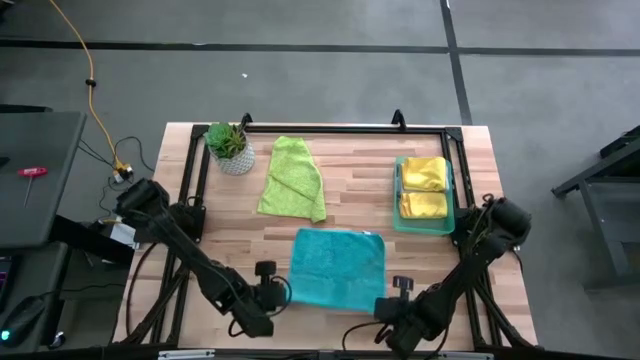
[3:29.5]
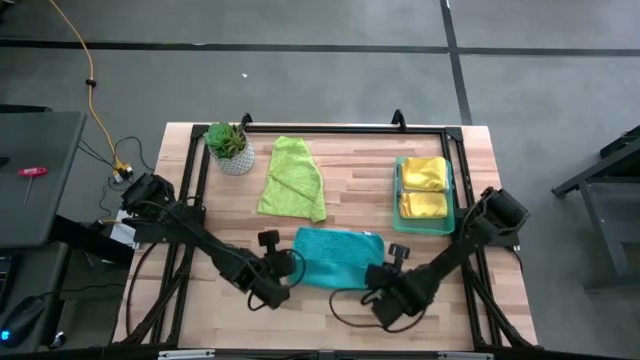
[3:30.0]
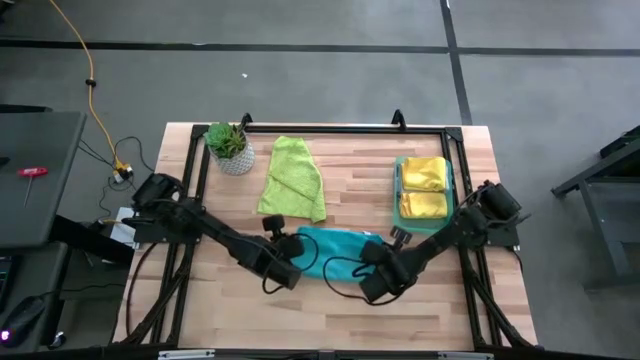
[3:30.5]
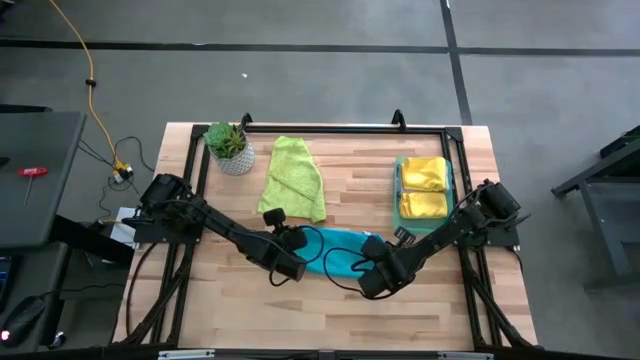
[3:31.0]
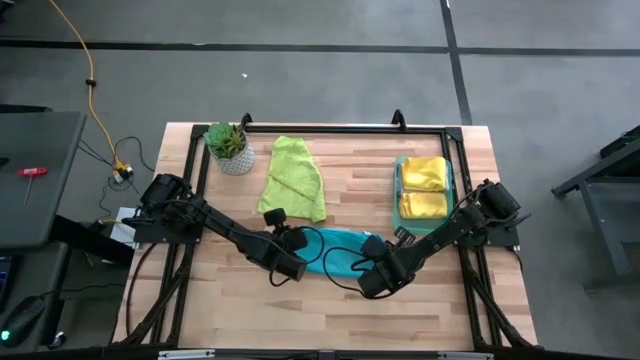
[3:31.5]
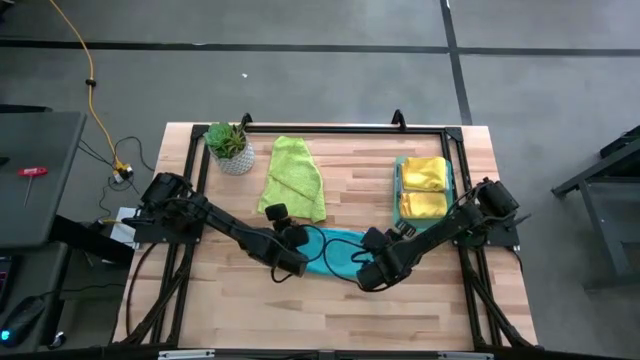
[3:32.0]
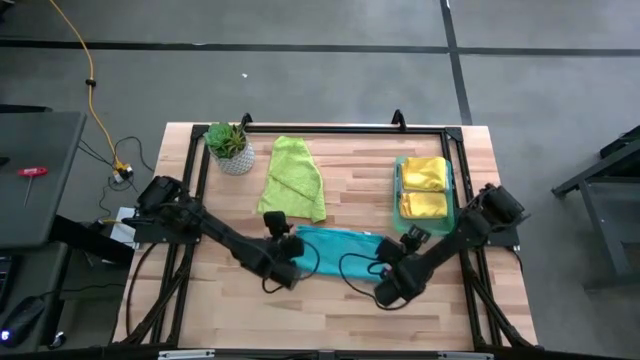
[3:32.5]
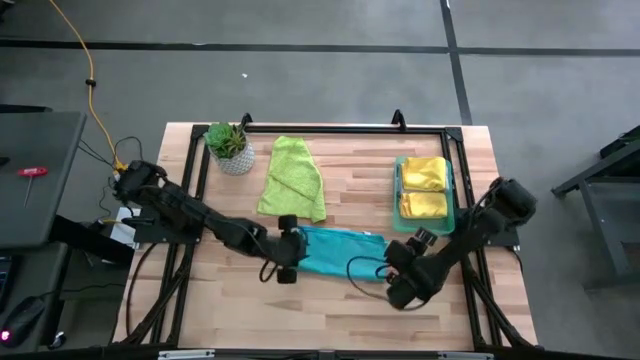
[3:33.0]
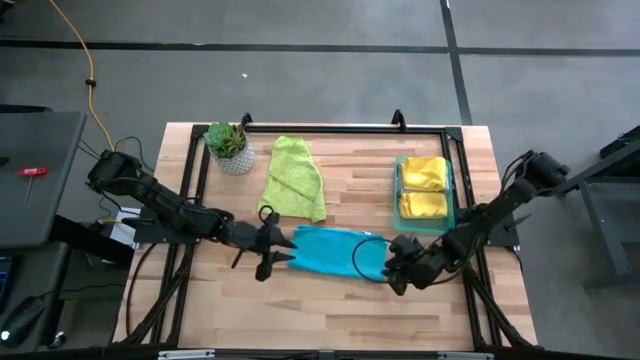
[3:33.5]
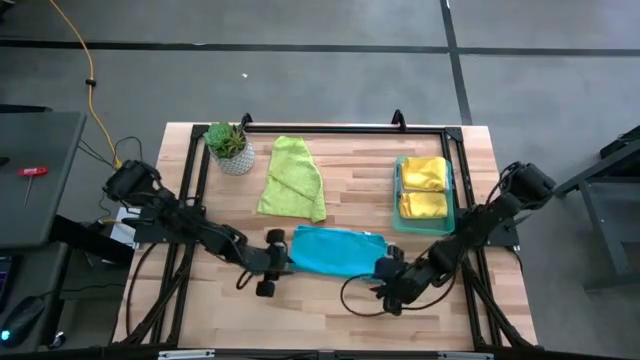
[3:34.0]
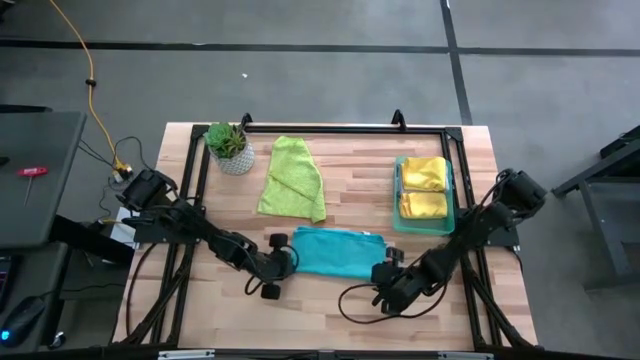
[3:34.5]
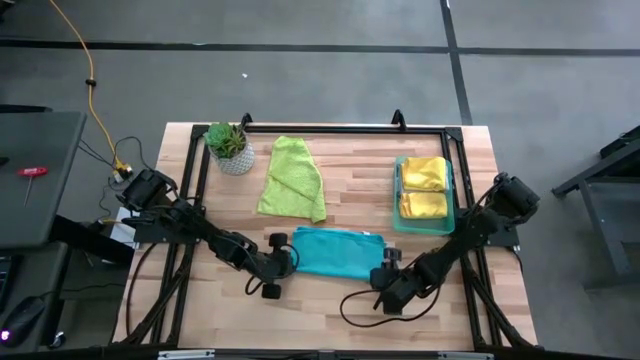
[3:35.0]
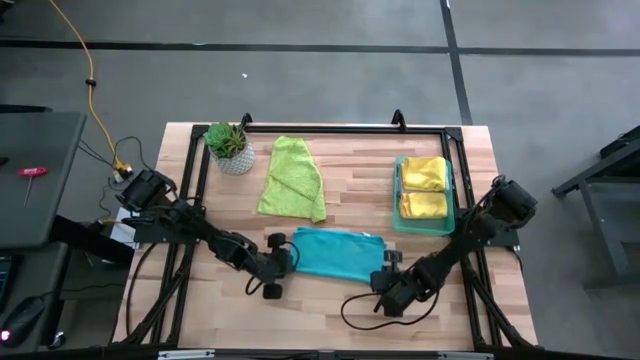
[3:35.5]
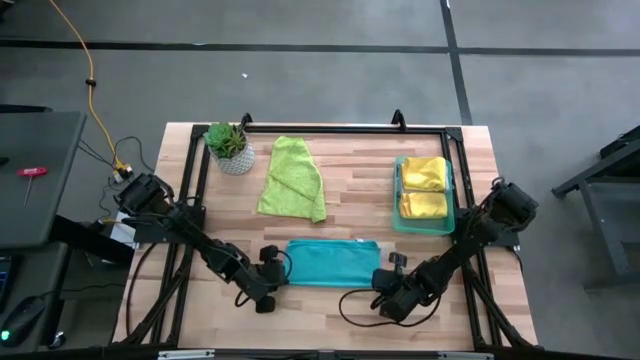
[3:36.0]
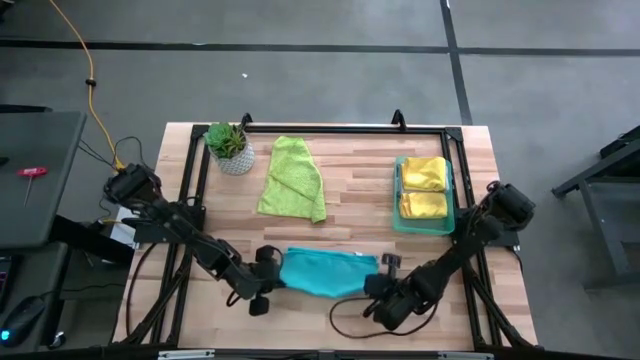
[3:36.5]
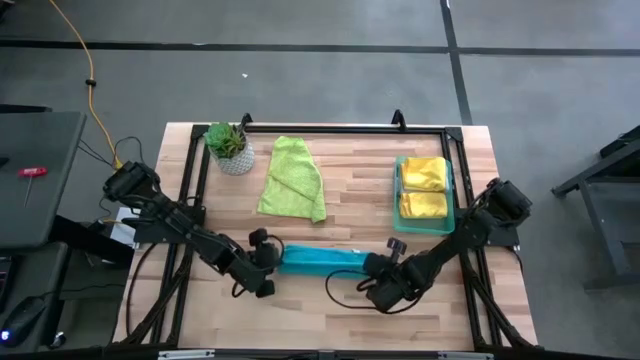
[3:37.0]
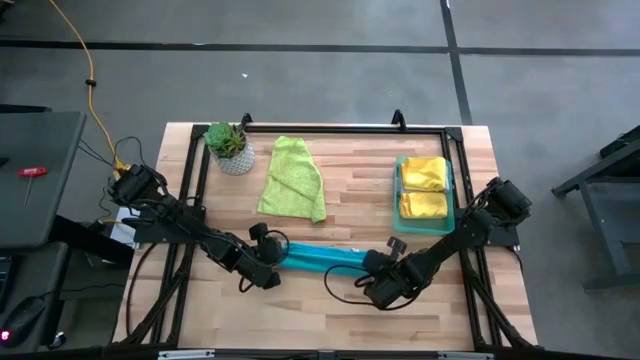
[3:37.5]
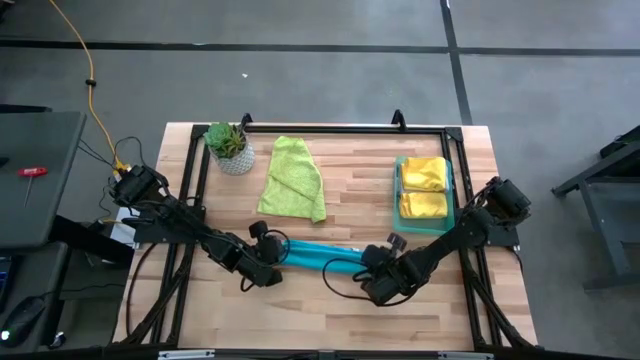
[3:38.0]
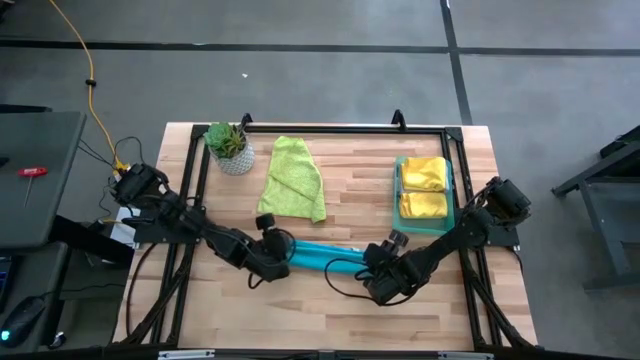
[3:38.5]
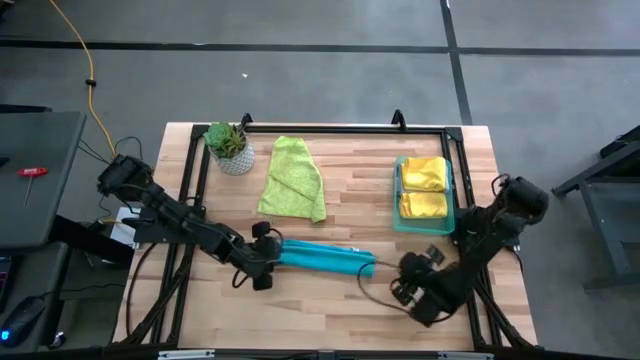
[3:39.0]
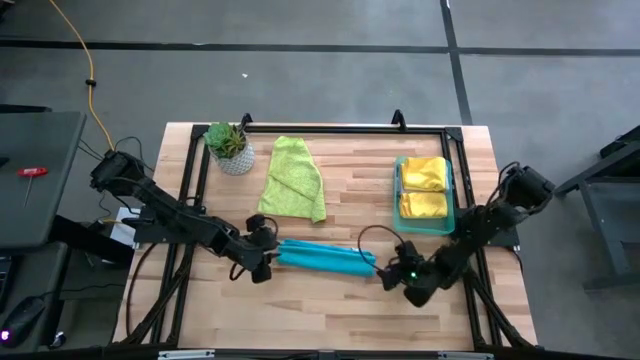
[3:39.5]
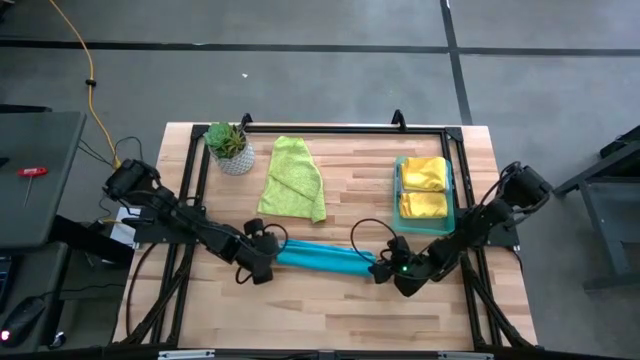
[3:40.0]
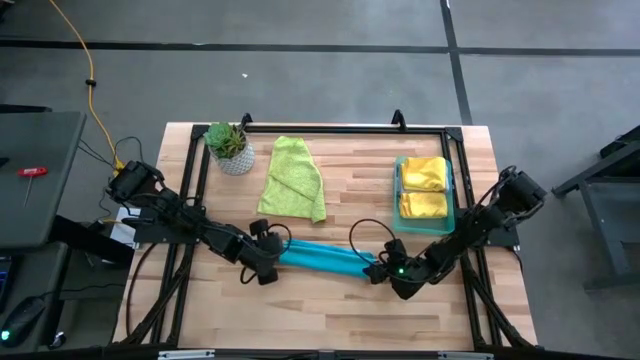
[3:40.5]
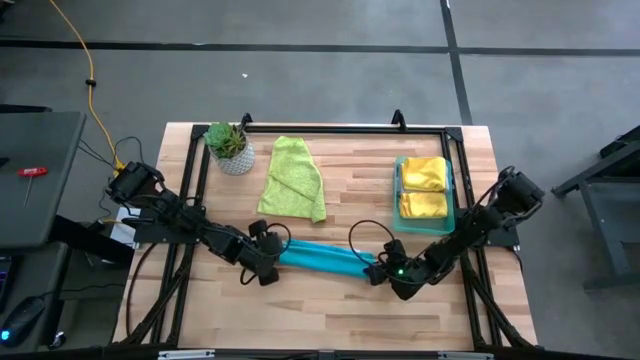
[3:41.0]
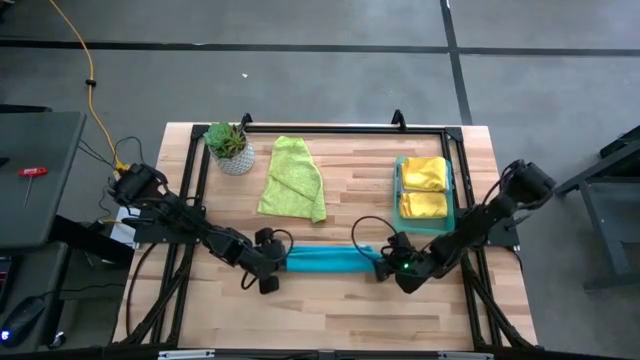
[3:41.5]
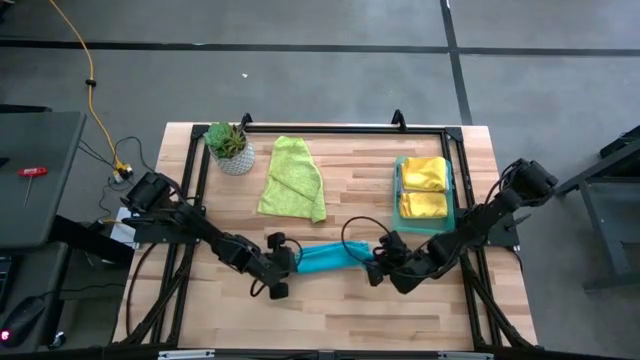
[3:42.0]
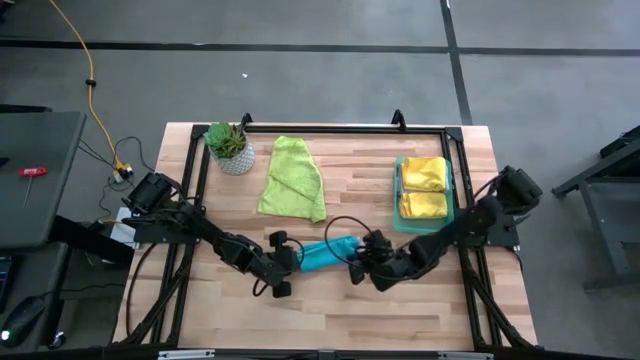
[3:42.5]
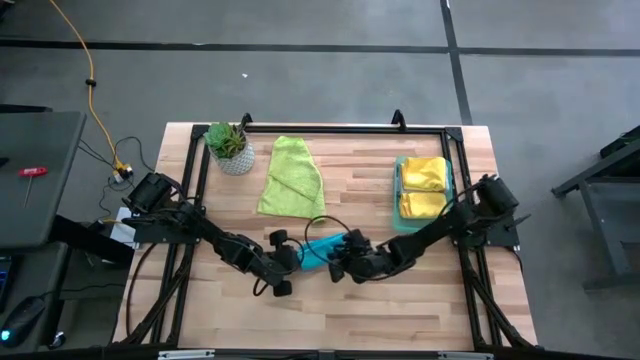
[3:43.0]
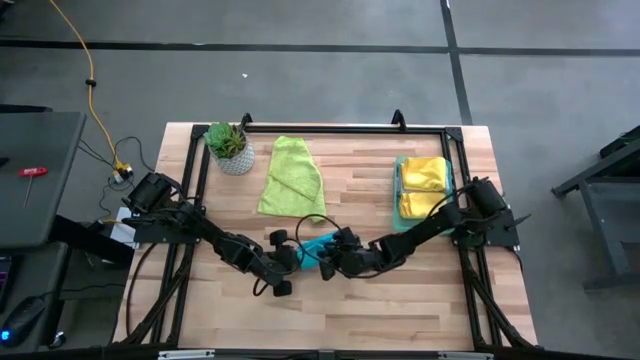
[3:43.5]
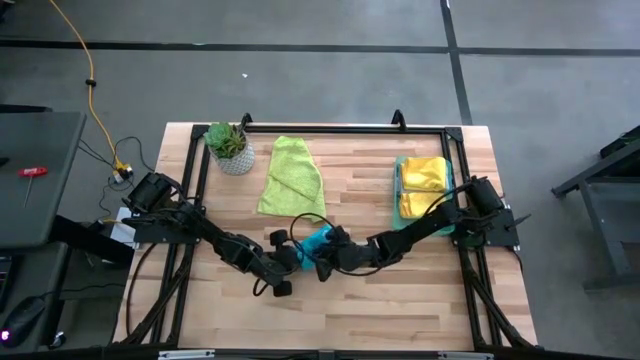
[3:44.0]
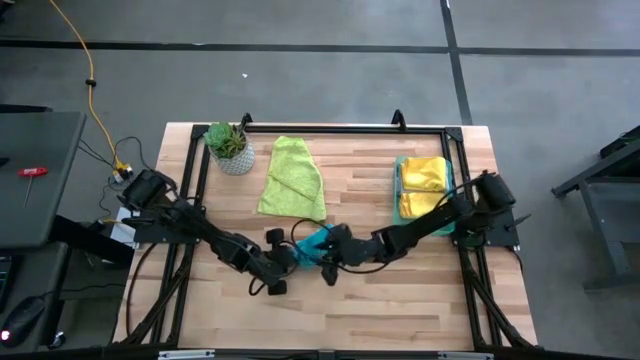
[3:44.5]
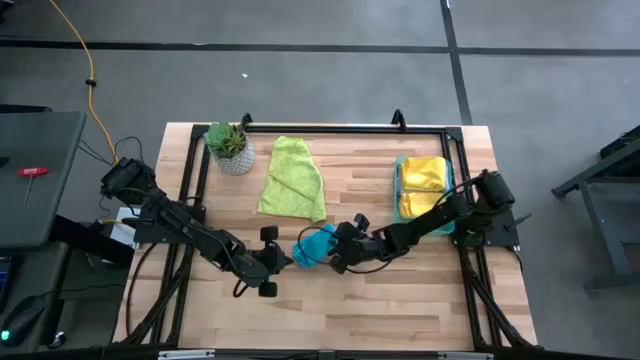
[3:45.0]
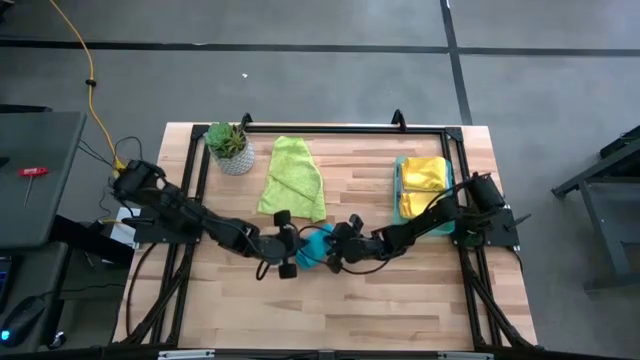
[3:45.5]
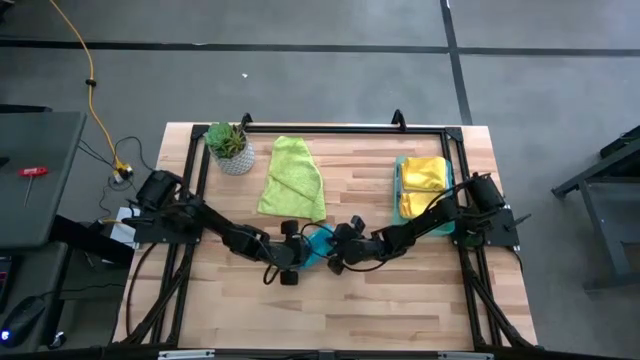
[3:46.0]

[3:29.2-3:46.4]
Task: Fold microfiber towels
Fold the blue microfiber cloth

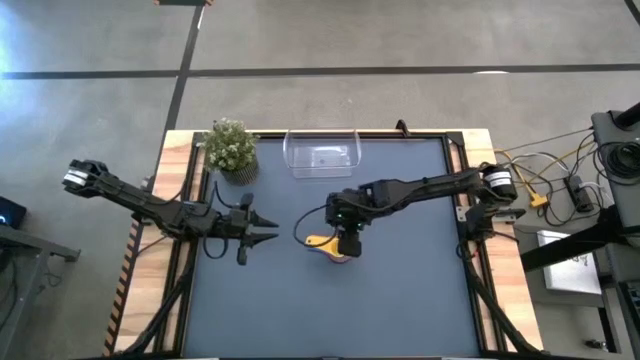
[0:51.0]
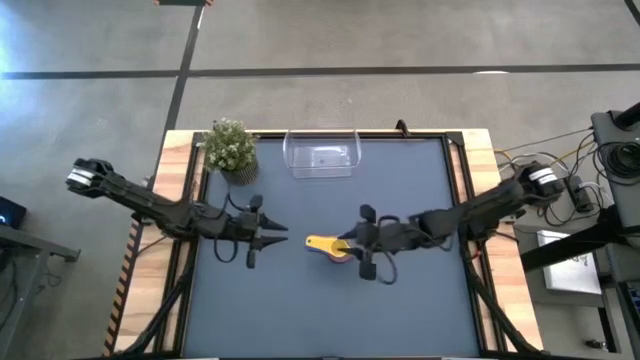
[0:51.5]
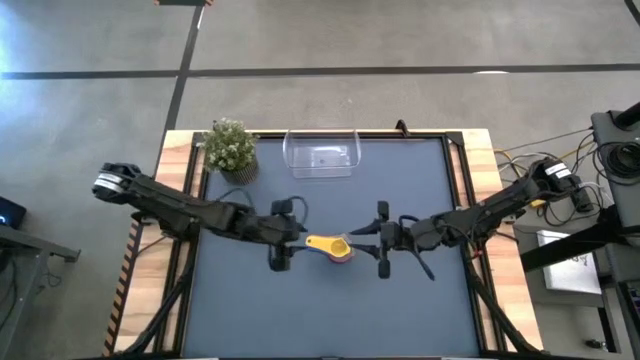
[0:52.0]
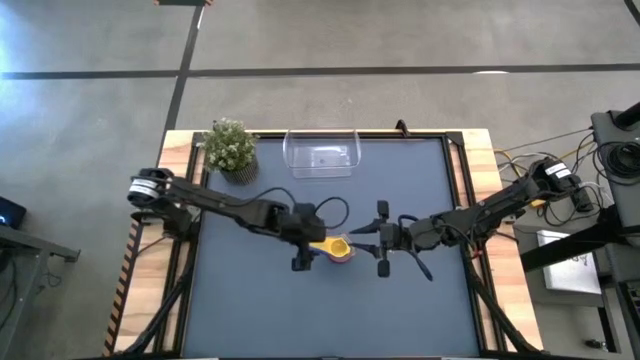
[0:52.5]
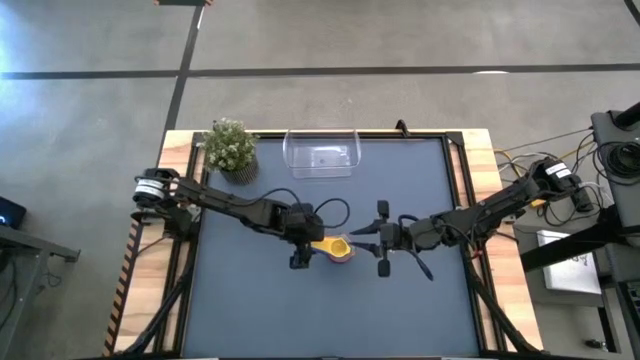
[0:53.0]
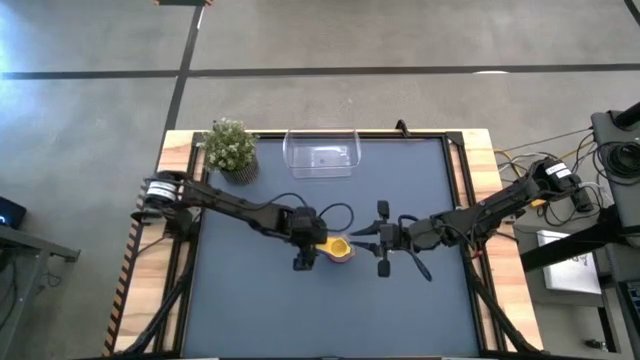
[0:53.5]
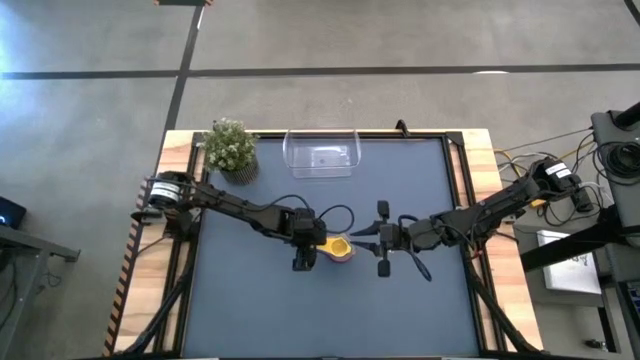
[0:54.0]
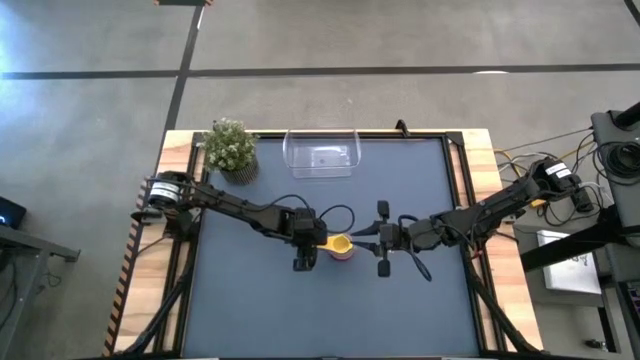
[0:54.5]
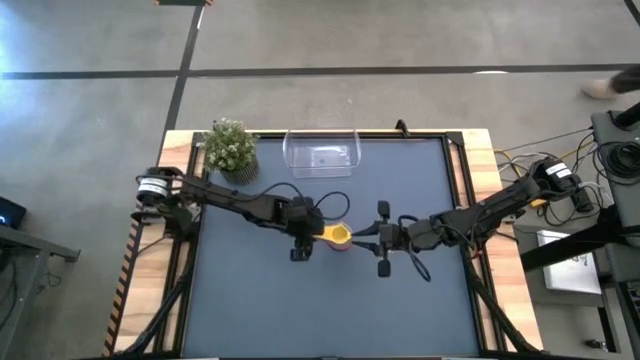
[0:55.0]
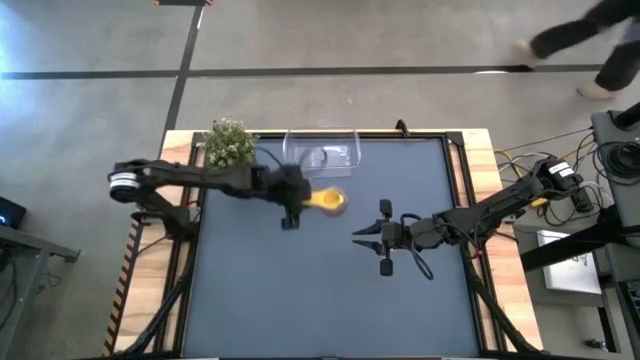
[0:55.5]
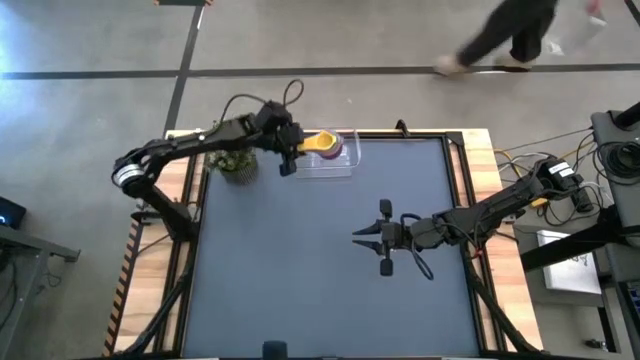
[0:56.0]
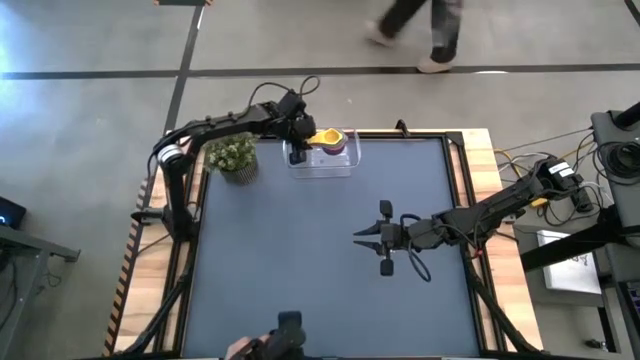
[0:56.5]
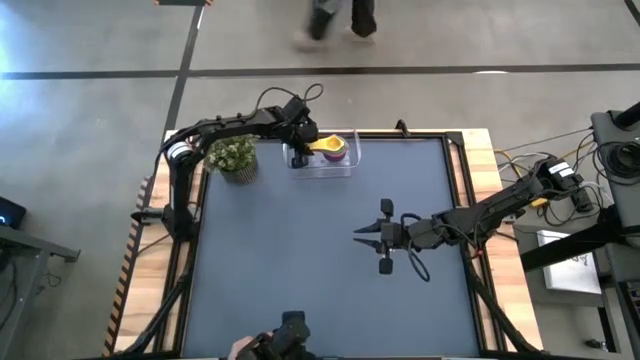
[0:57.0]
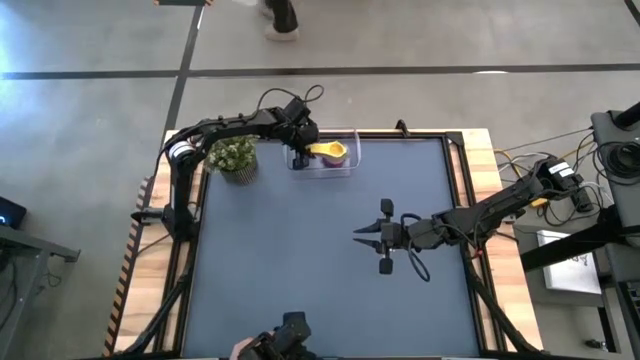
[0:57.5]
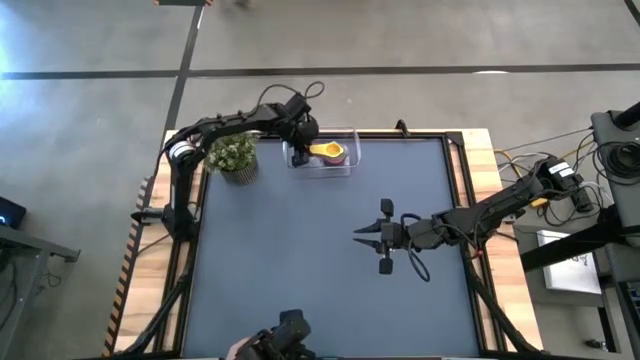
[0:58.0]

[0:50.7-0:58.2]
Task: Nest measuring cups in basket
Put the stacked measuring cups into the transparent bin
